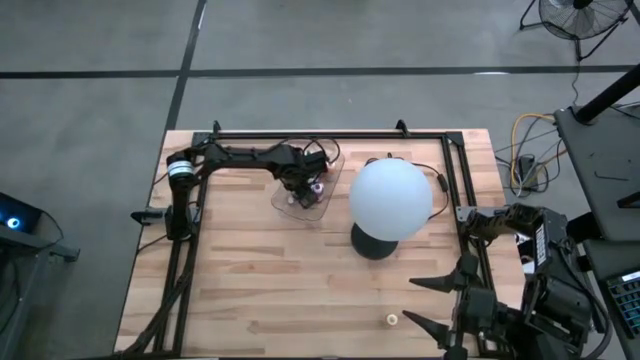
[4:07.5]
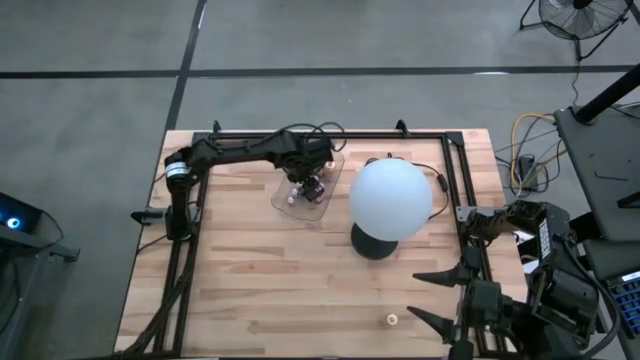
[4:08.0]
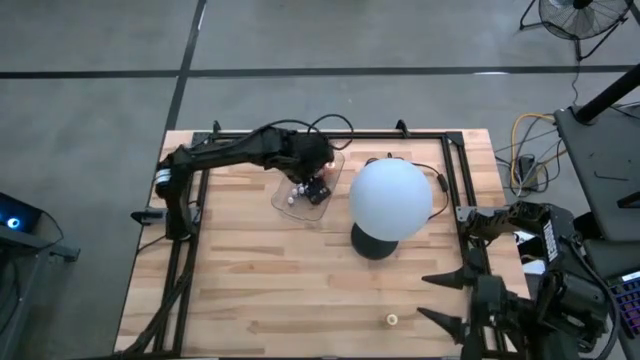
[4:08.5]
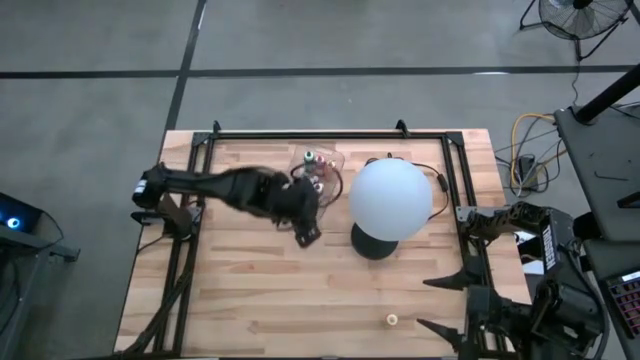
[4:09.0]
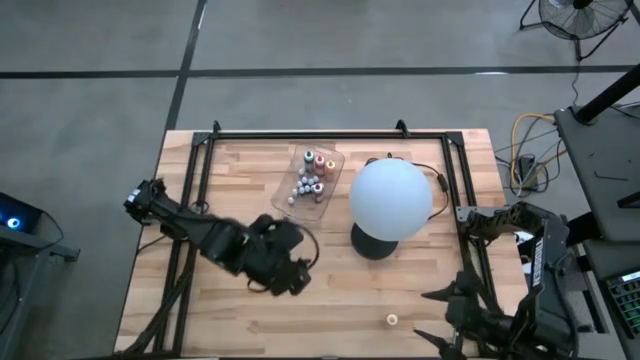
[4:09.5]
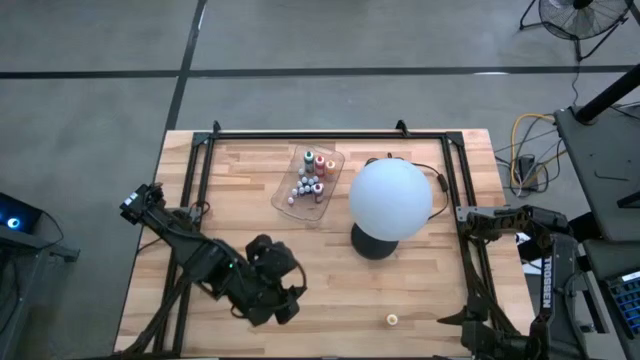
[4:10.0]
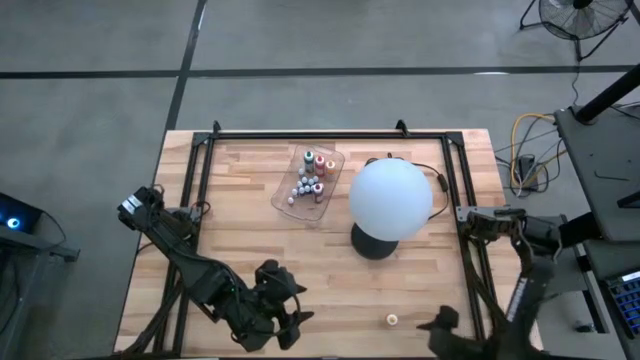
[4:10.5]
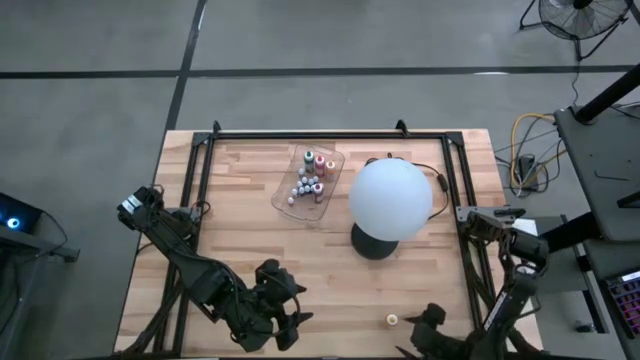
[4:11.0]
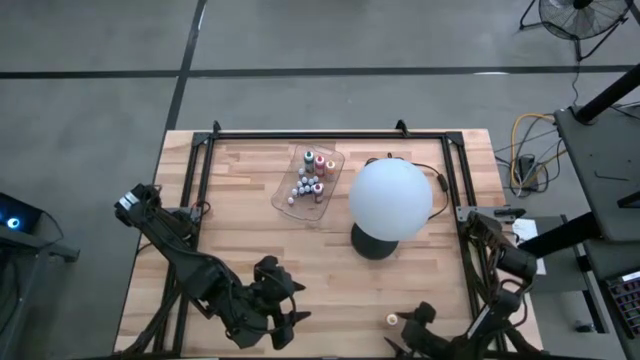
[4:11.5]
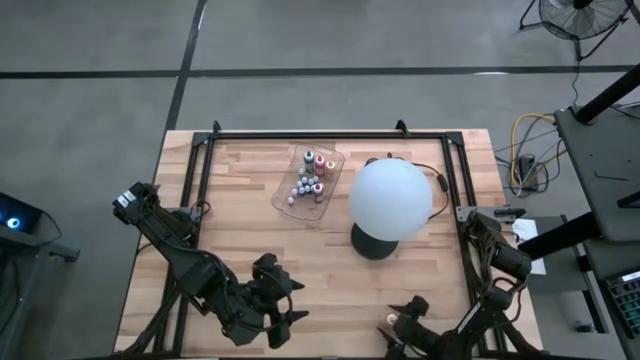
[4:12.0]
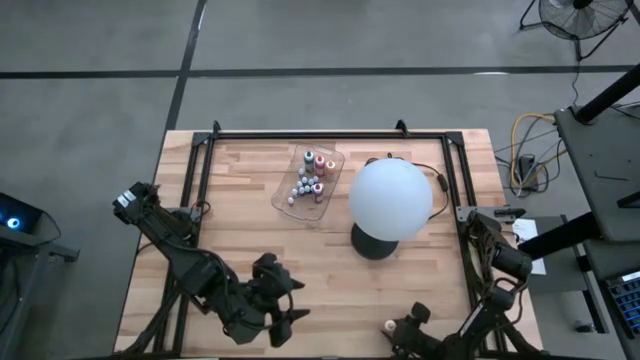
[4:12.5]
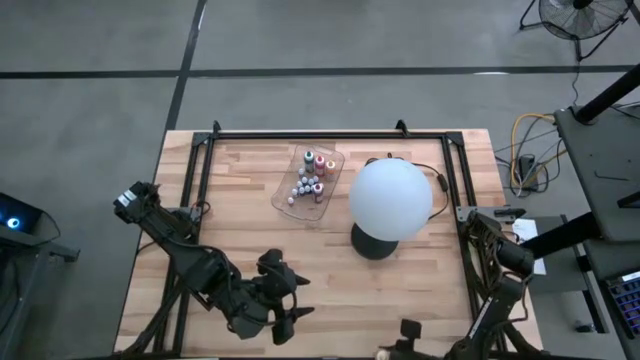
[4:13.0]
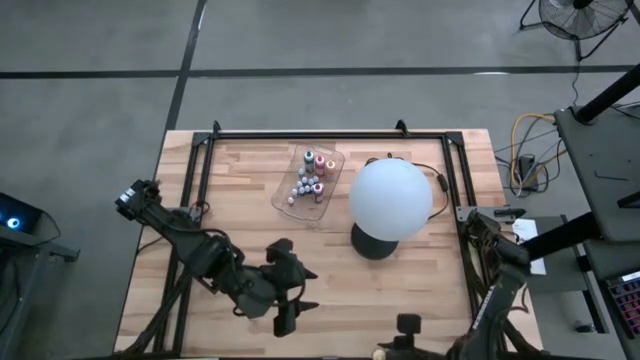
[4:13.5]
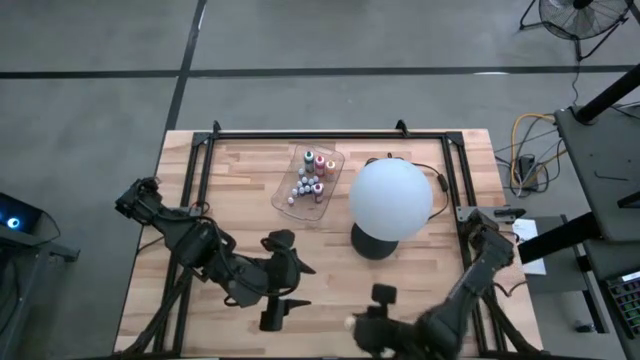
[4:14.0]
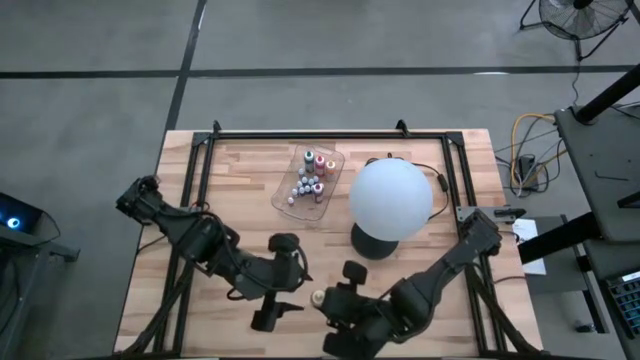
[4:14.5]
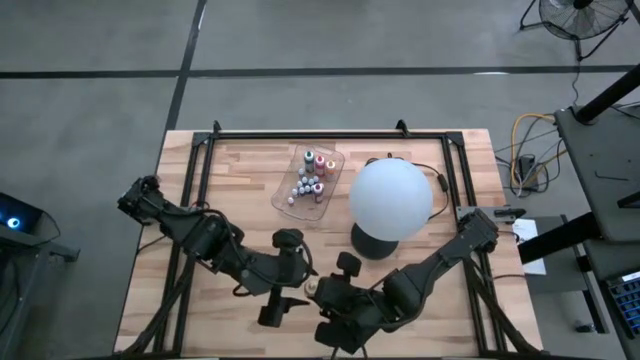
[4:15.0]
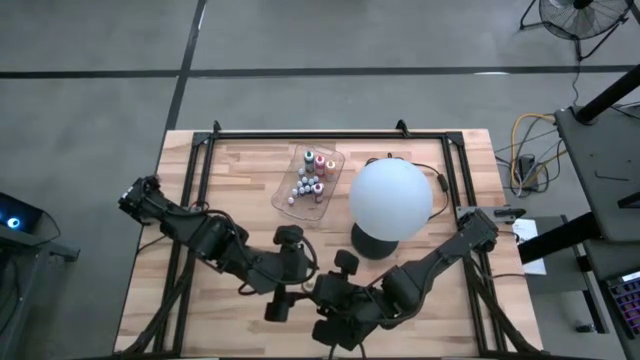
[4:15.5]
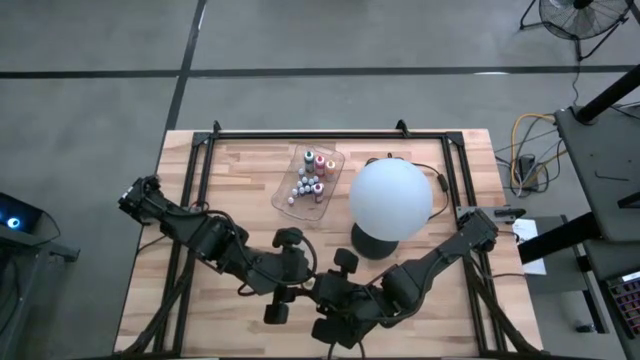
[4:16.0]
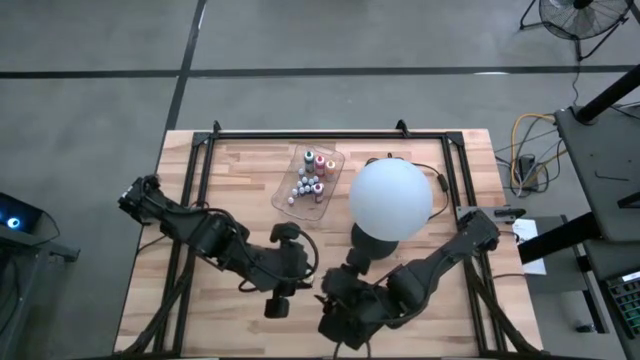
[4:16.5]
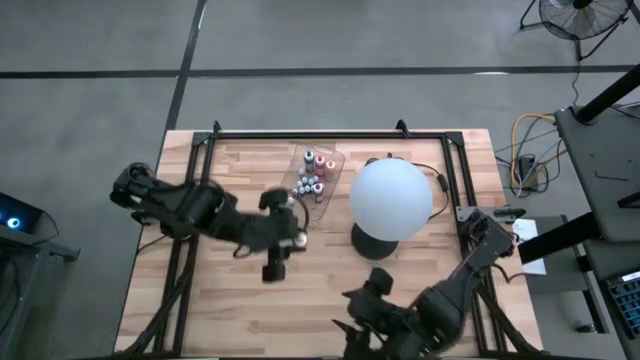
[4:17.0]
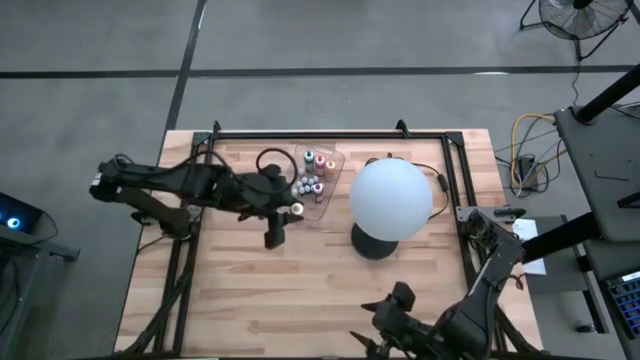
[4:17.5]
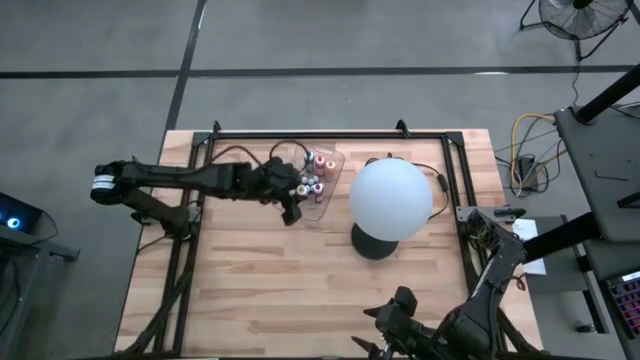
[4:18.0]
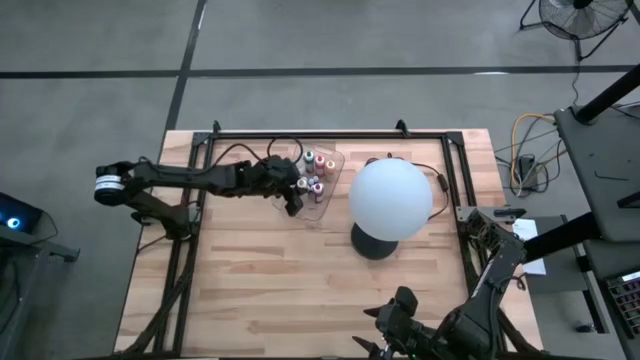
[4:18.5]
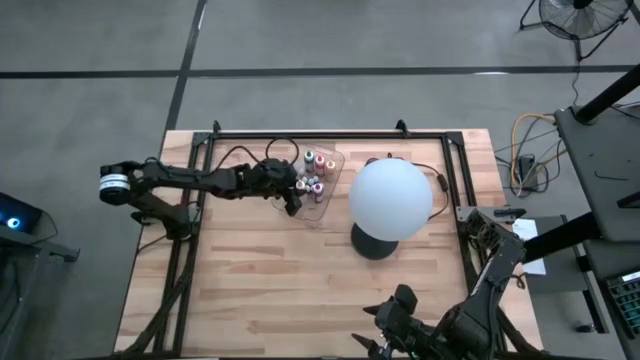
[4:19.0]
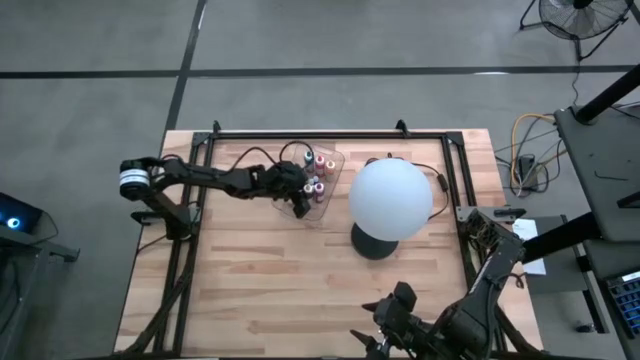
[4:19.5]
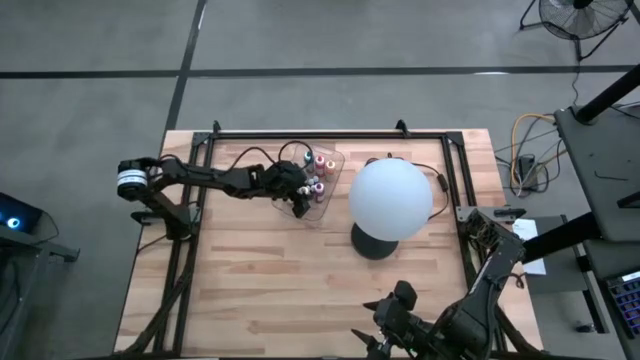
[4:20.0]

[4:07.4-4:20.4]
Task: Pick & Place food coloring
Put the large yellow food coloring bottle into the transparent bin

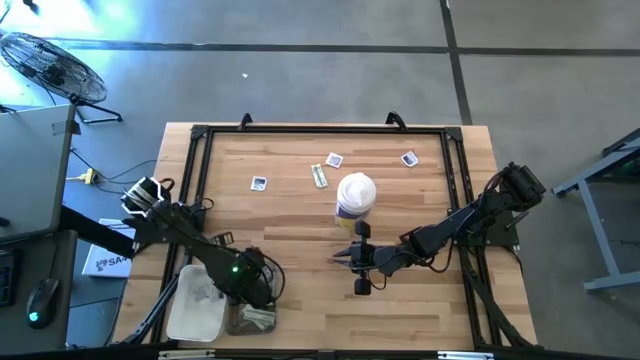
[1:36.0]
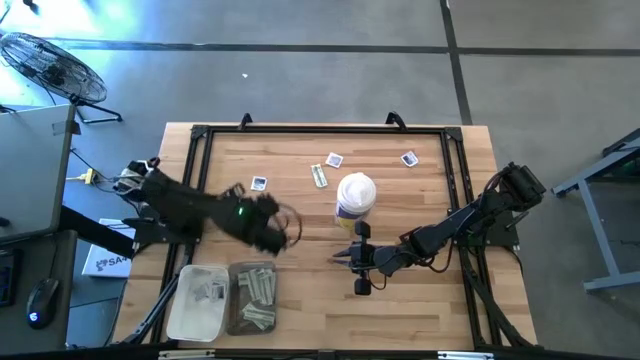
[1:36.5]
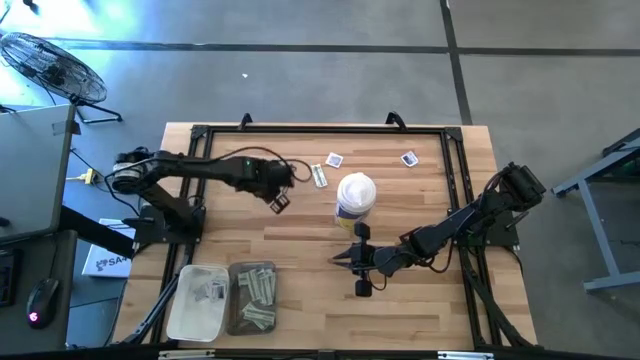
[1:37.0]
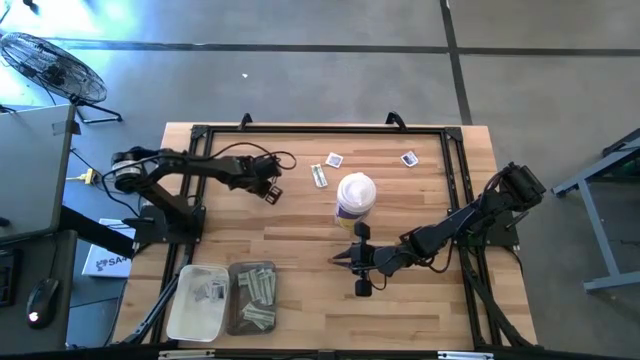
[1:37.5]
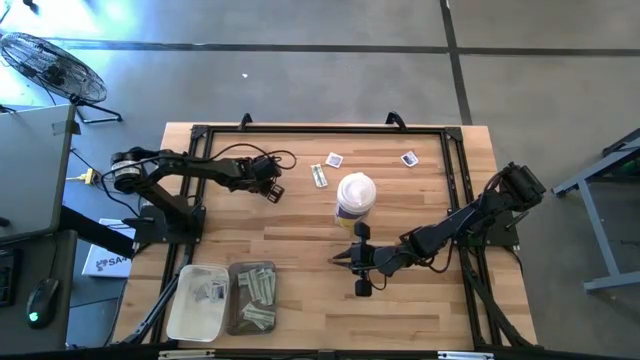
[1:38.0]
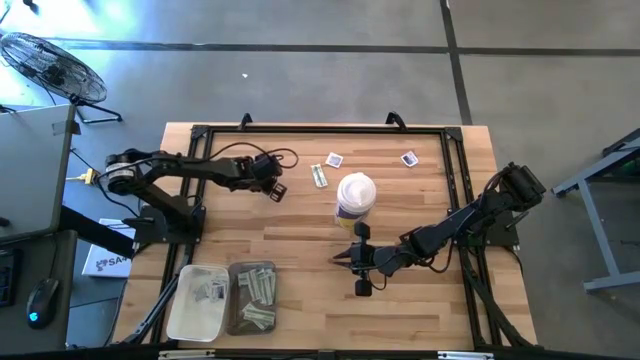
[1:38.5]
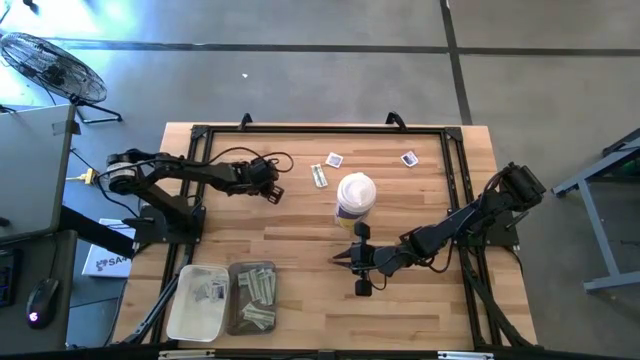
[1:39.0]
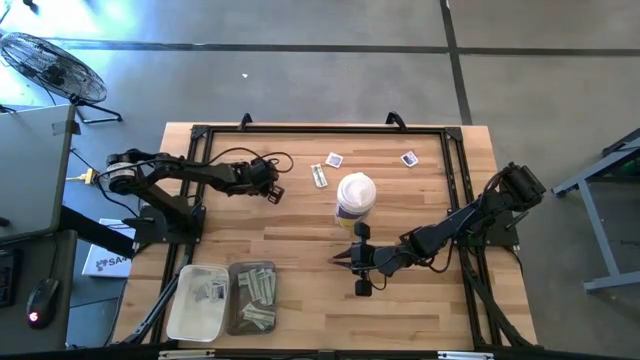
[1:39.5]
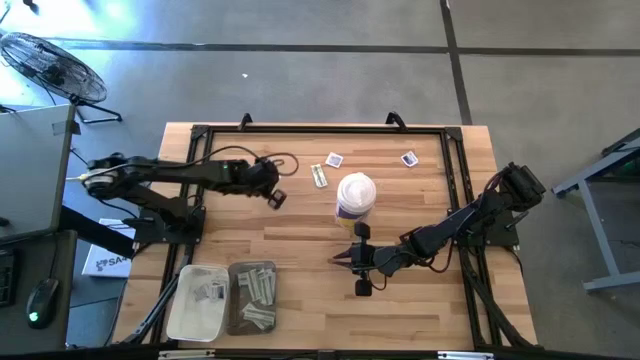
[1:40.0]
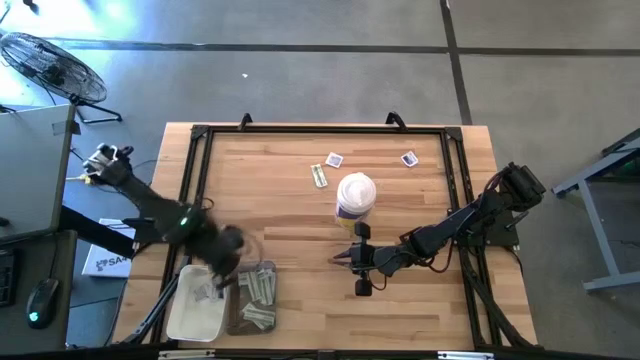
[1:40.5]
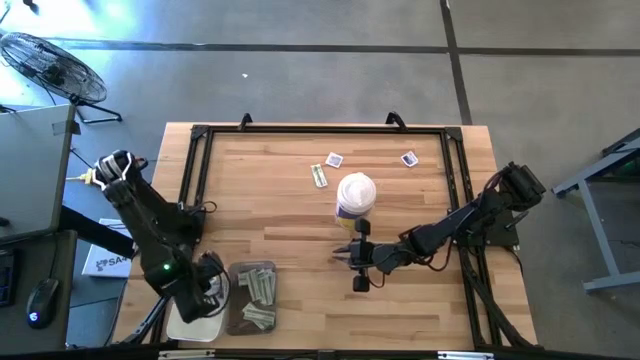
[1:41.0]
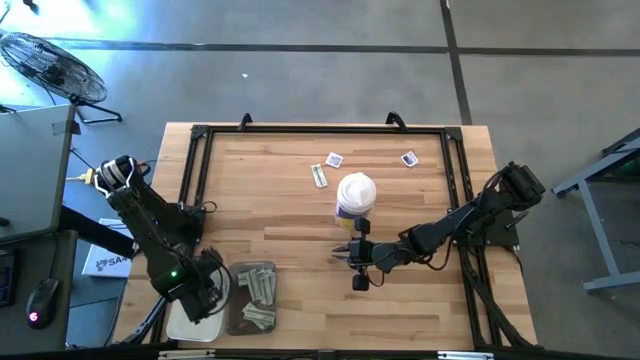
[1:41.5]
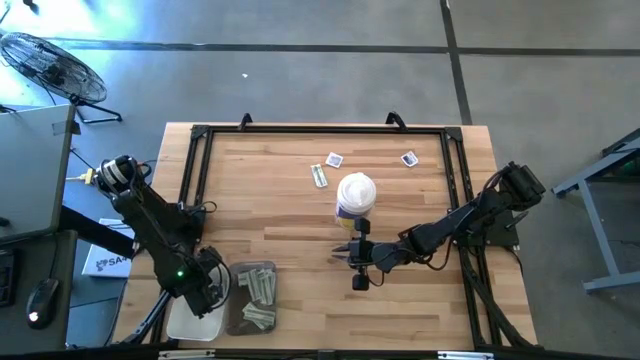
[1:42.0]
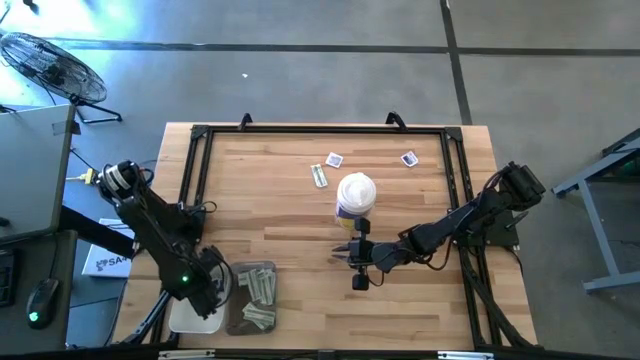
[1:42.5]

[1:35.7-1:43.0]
Task: Pick & Place First Aid Supplies
Put the alcohol pad into the white bin

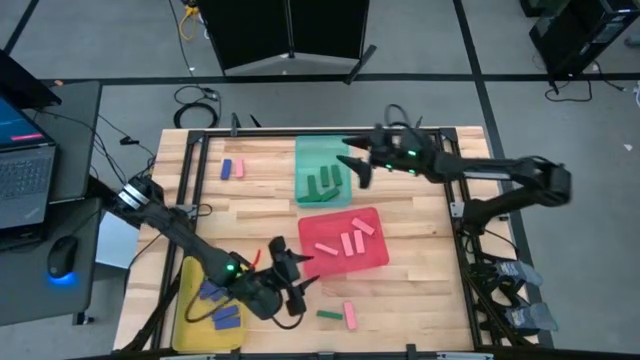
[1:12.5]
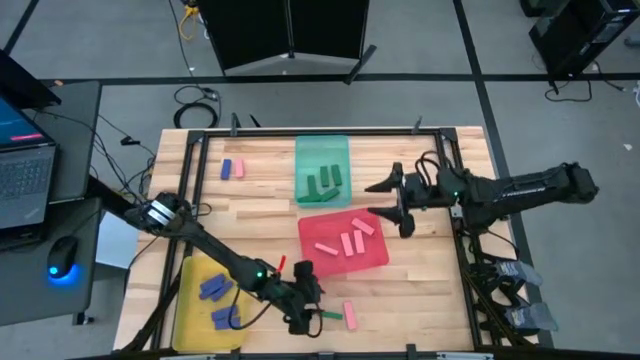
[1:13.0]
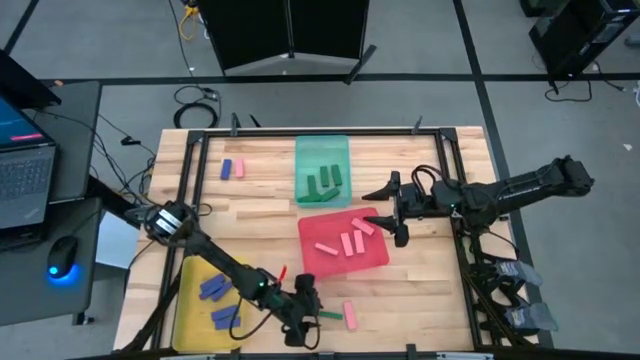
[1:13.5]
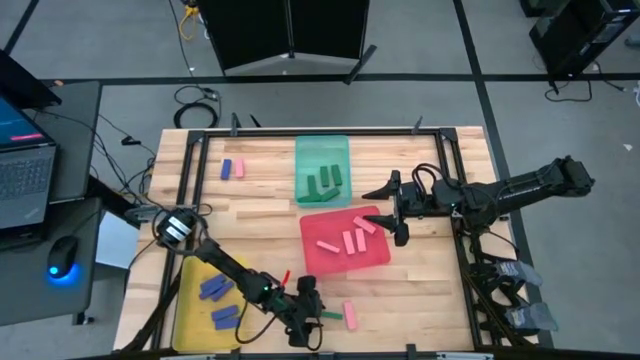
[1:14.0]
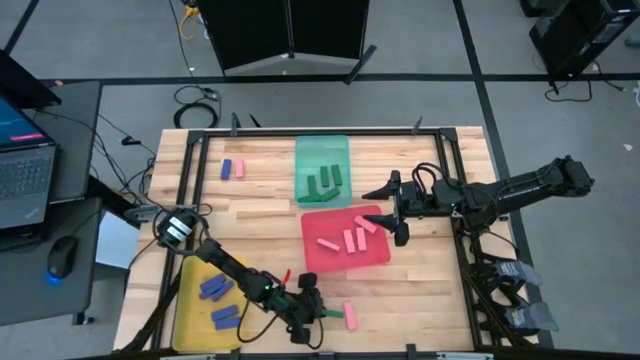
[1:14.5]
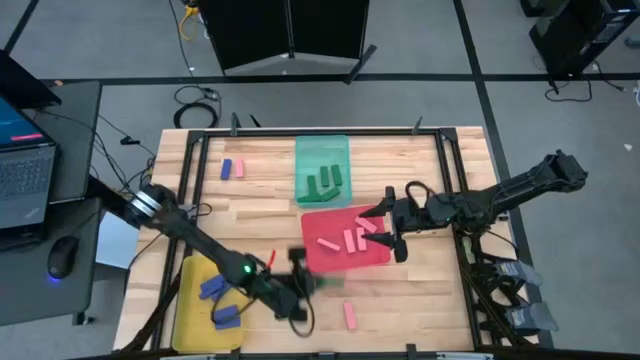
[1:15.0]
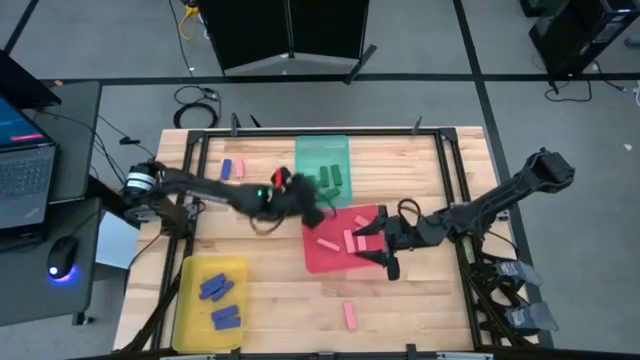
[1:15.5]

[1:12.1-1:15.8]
Task: Sort blocks
Put the green block into the green bin
